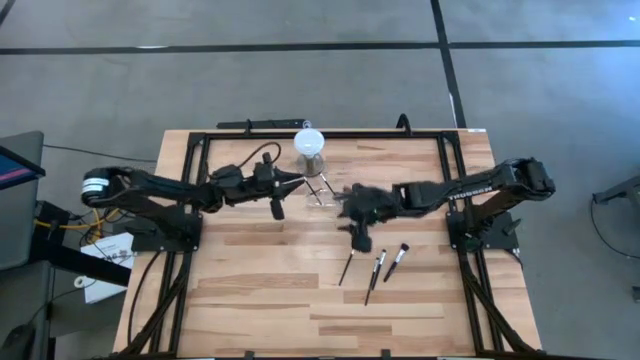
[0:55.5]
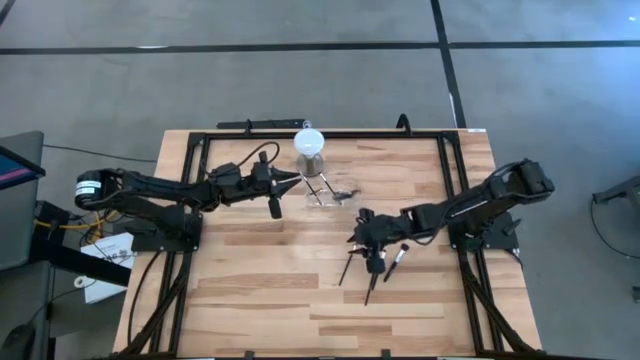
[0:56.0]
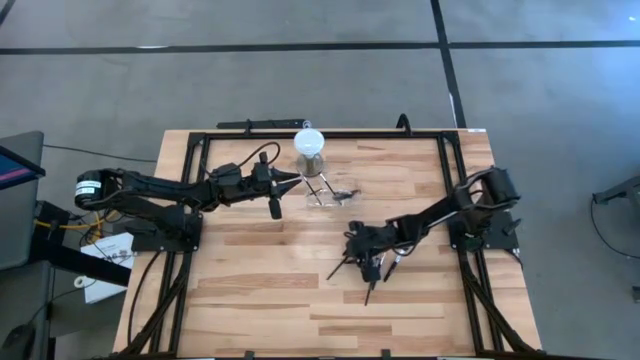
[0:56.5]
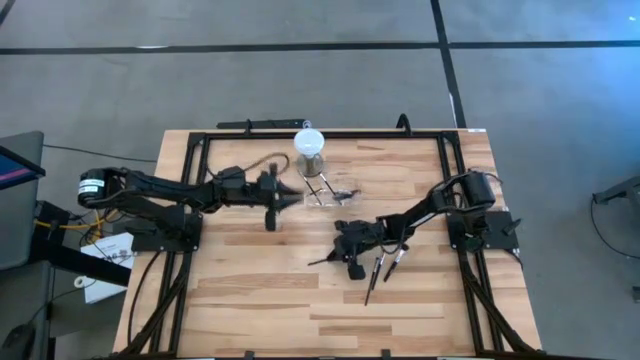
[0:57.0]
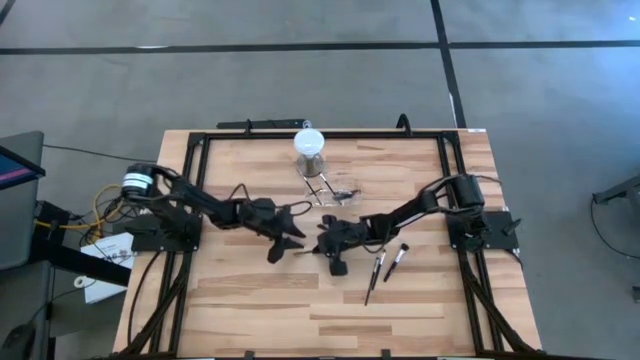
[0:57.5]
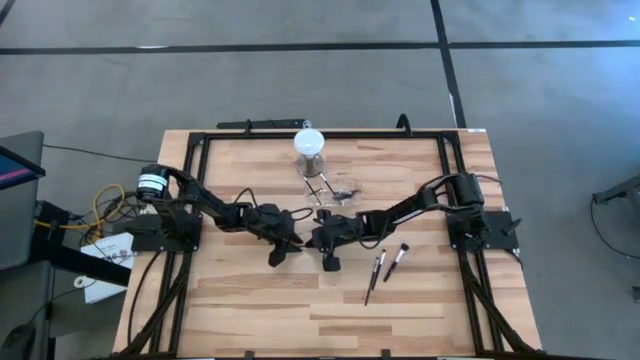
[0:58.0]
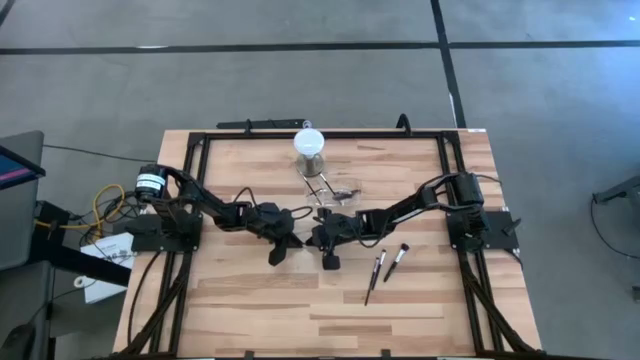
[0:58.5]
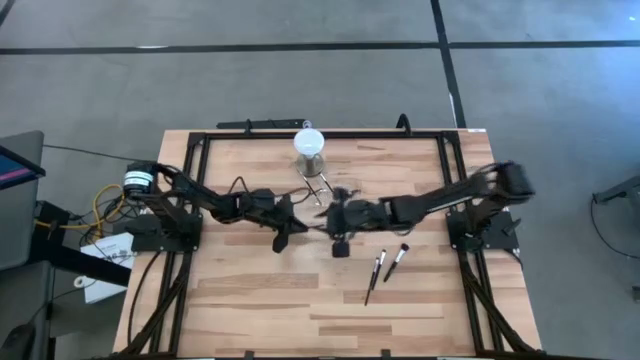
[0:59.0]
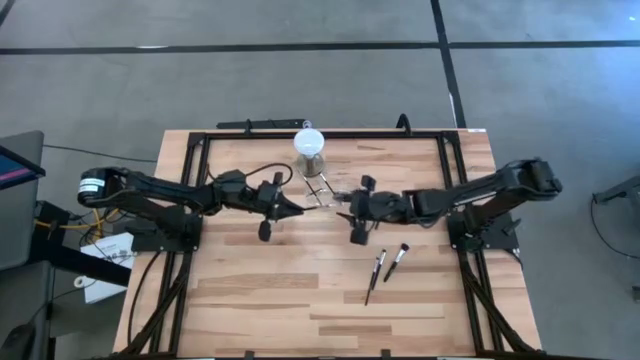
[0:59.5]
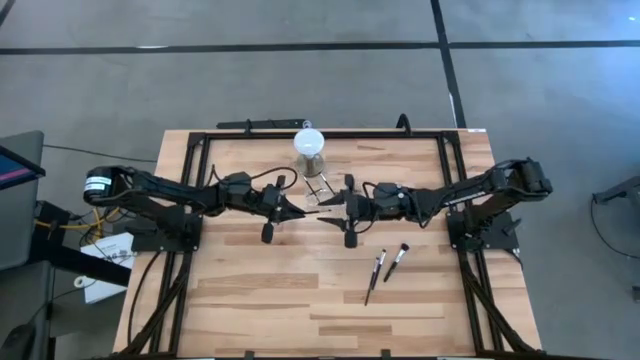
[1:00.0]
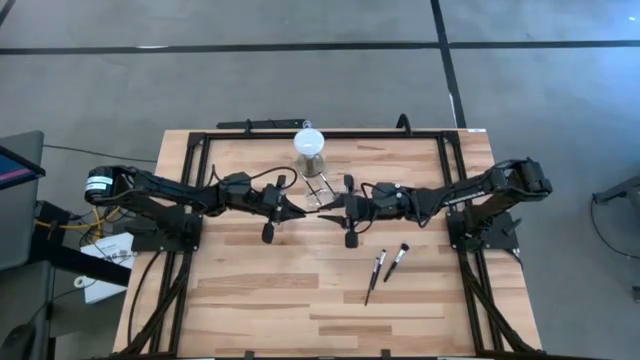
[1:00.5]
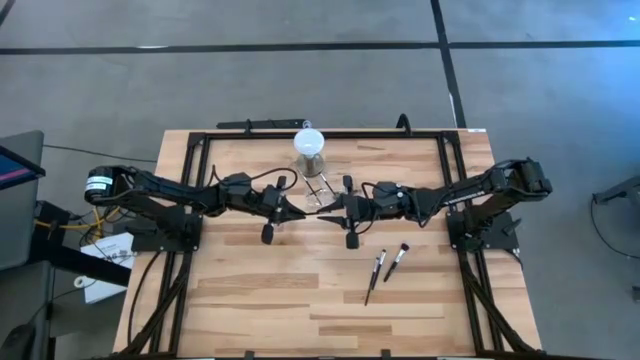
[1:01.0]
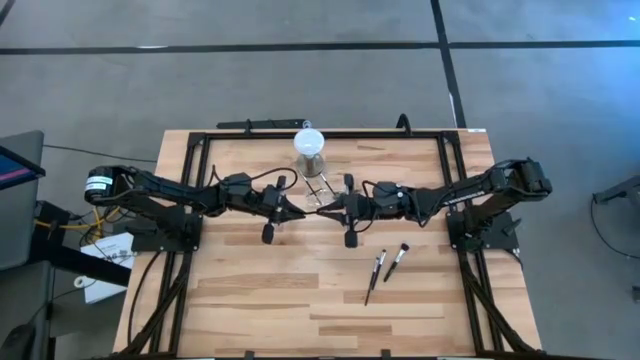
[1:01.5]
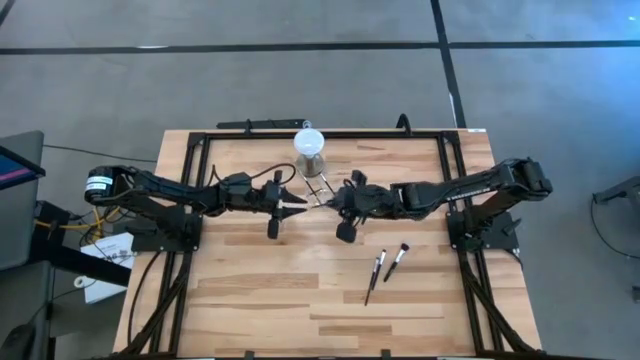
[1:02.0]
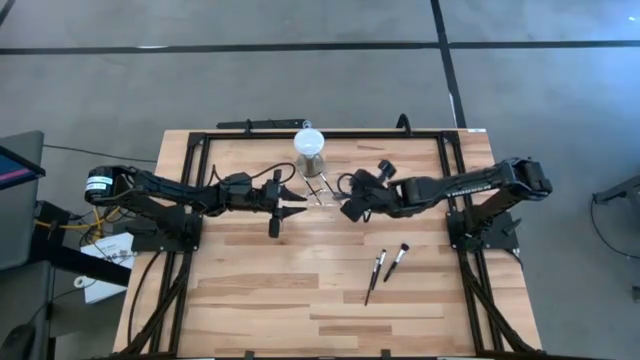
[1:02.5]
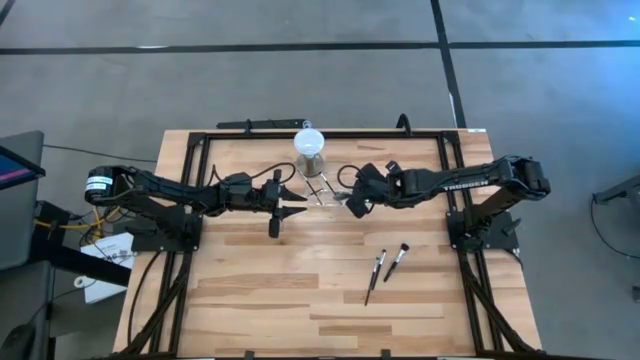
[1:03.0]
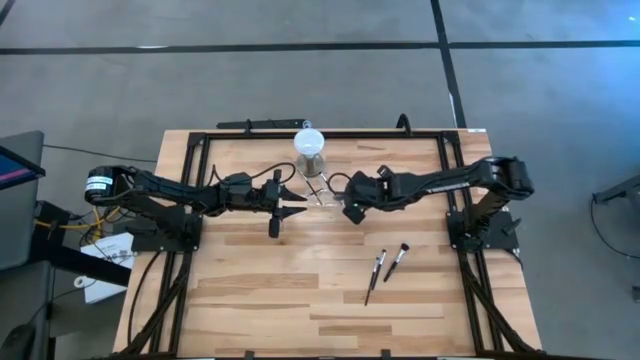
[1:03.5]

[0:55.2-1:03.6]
Task: Put items in baskets/containers
Put the black eyeshadow brush into the transparent organizer

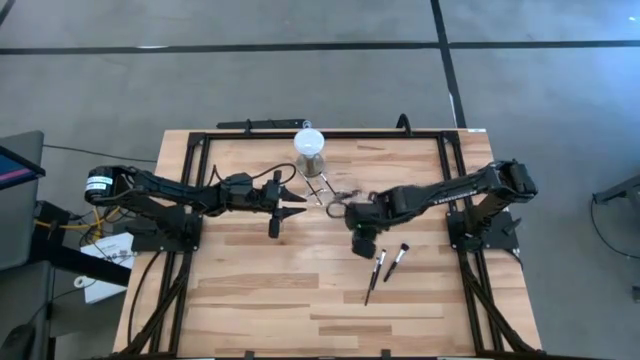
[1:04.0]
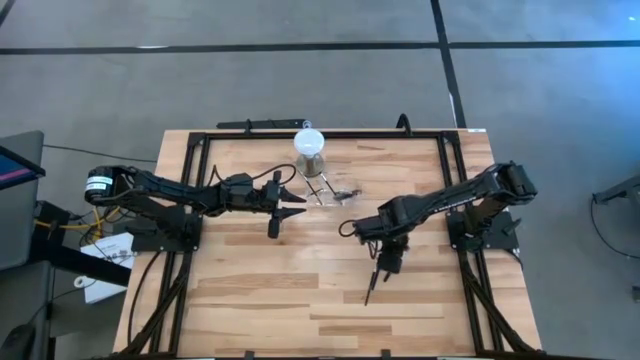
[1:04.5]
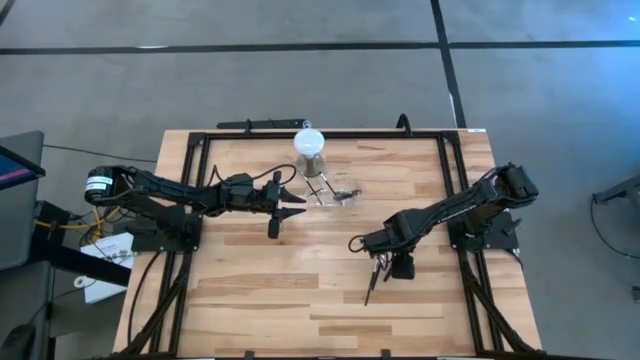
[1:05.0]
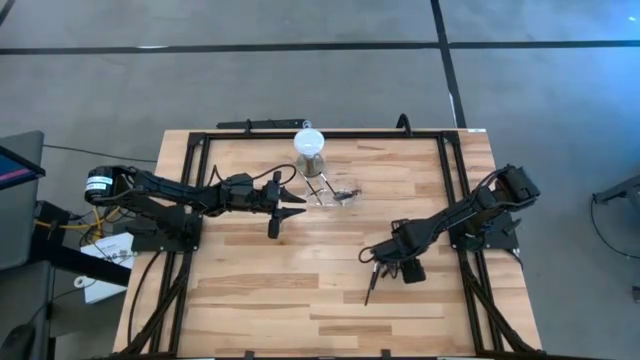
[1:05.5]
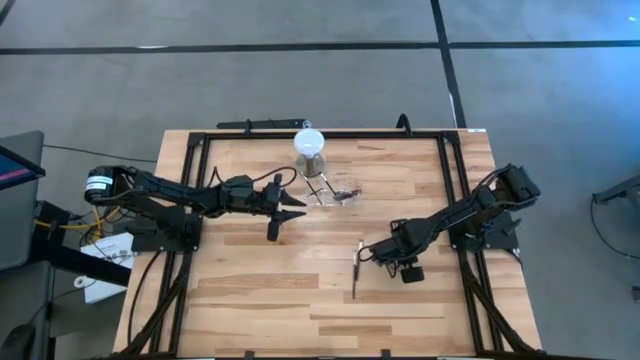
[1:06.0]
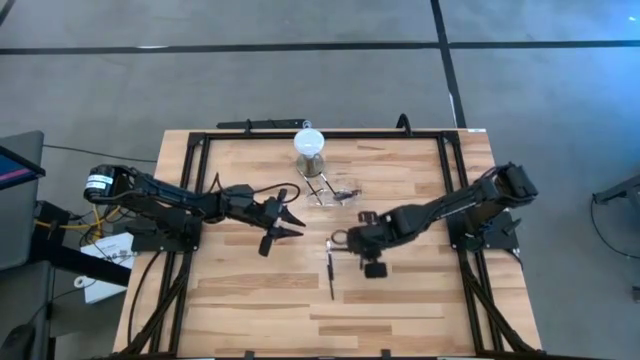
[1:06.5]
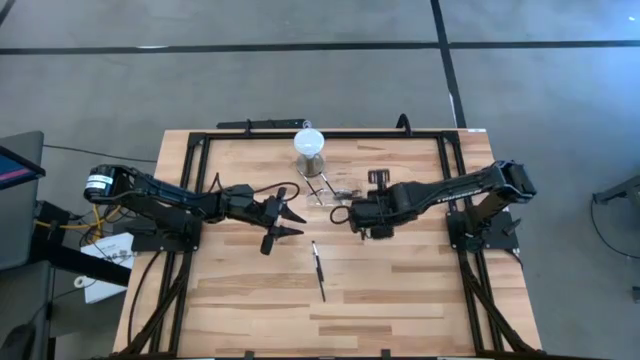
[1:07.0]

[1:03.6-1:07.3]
Put the black powder brush into the transparent organizer

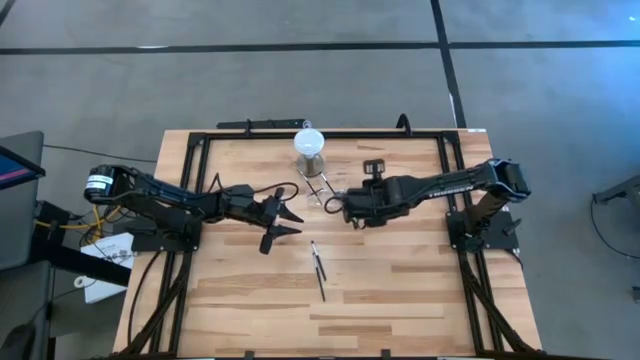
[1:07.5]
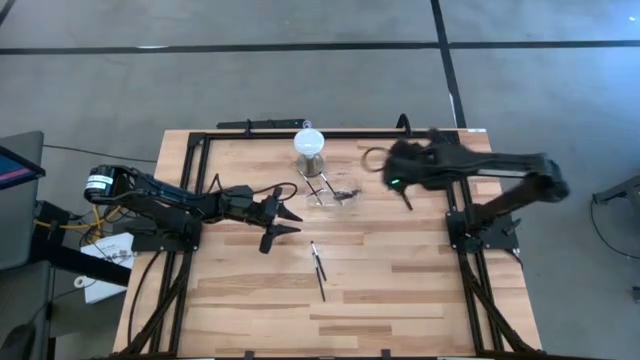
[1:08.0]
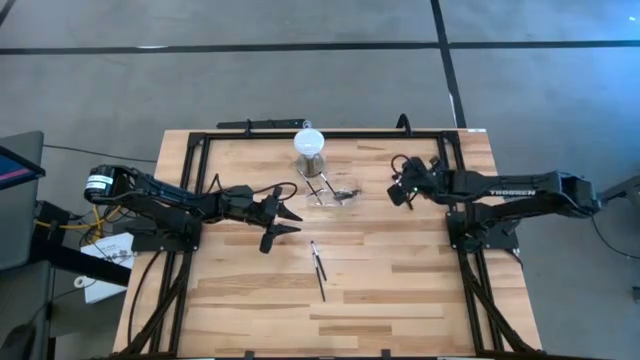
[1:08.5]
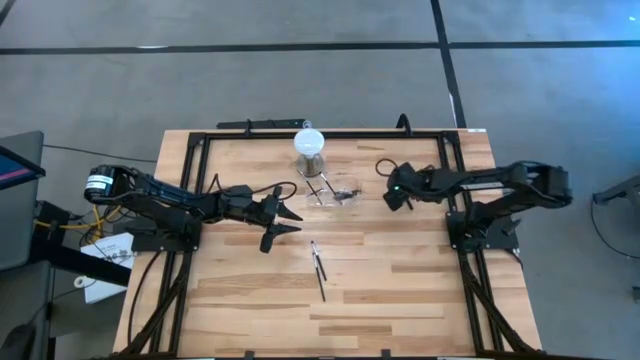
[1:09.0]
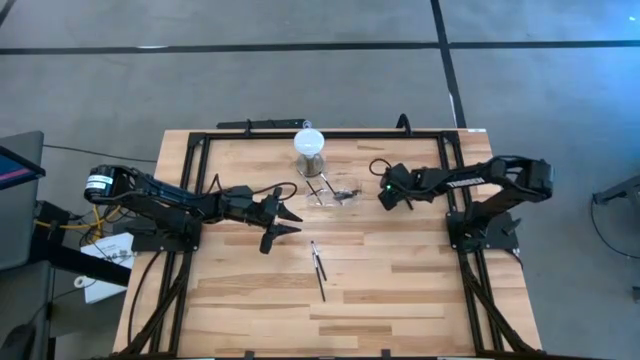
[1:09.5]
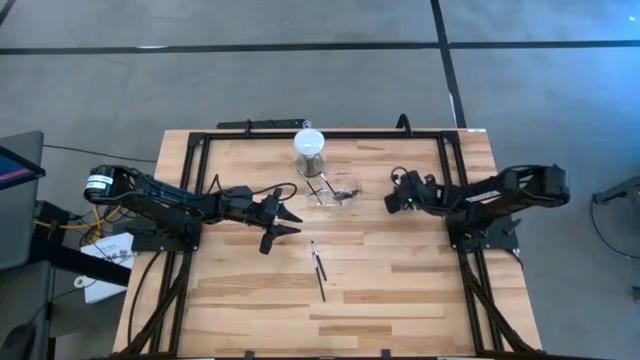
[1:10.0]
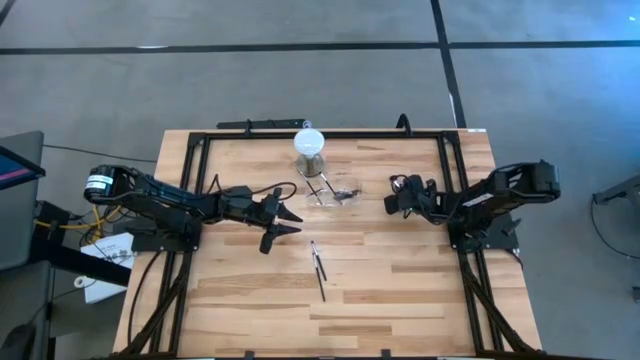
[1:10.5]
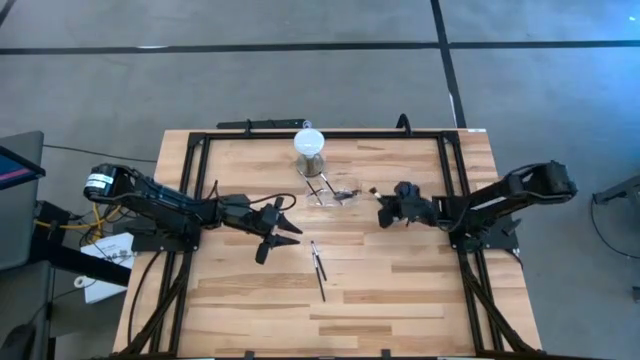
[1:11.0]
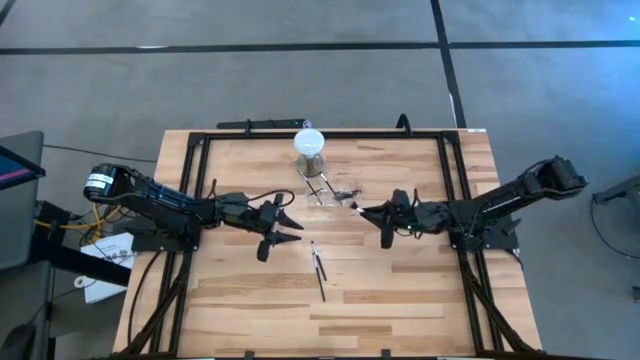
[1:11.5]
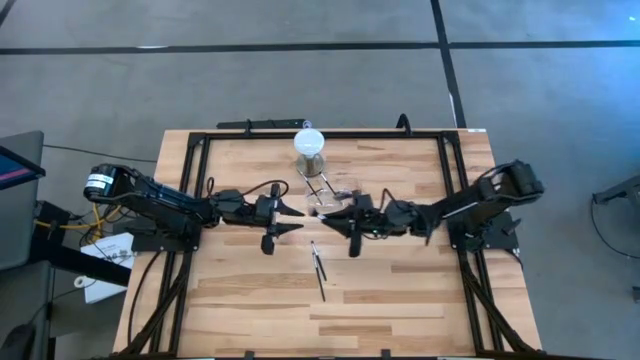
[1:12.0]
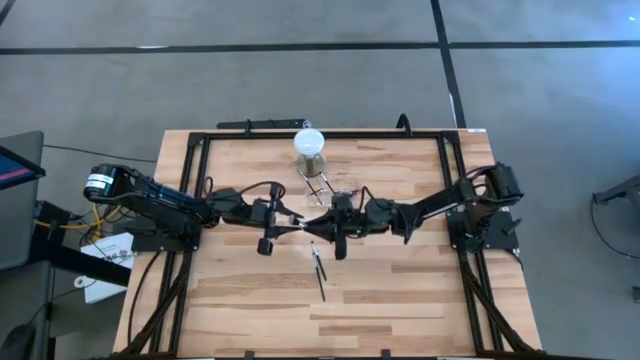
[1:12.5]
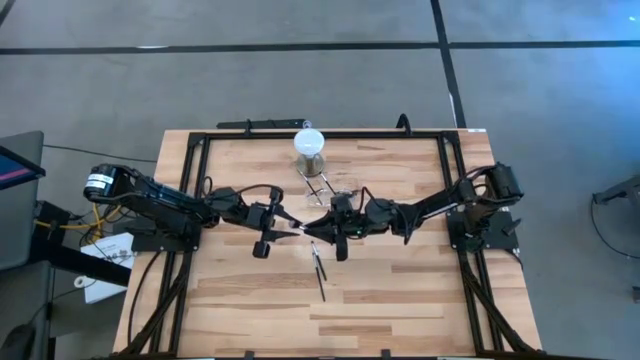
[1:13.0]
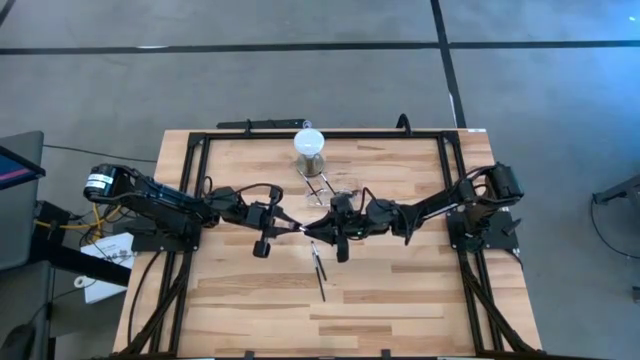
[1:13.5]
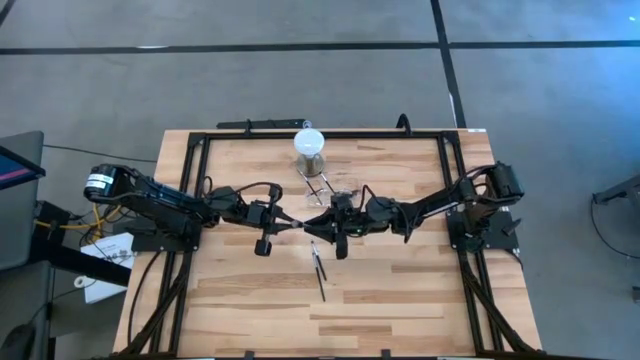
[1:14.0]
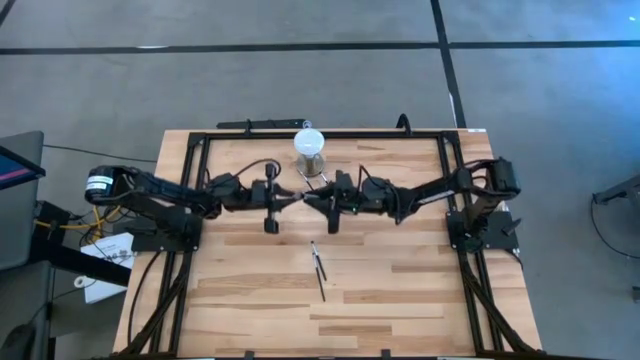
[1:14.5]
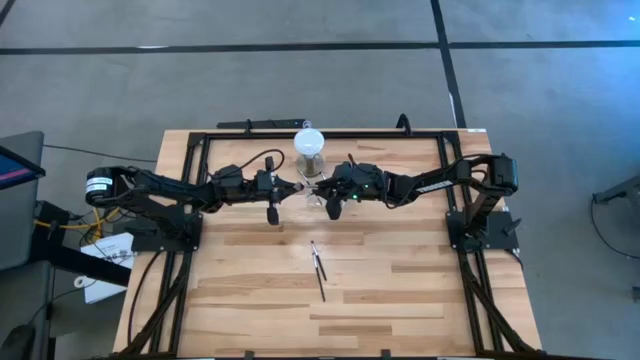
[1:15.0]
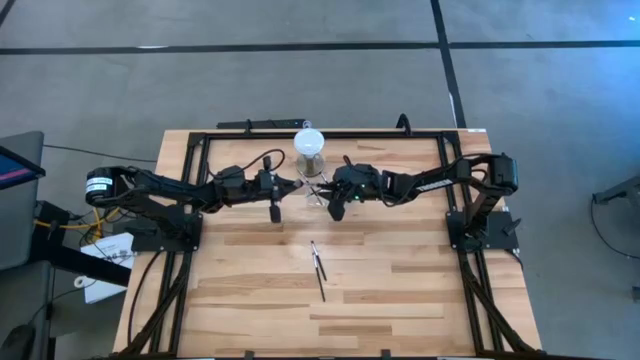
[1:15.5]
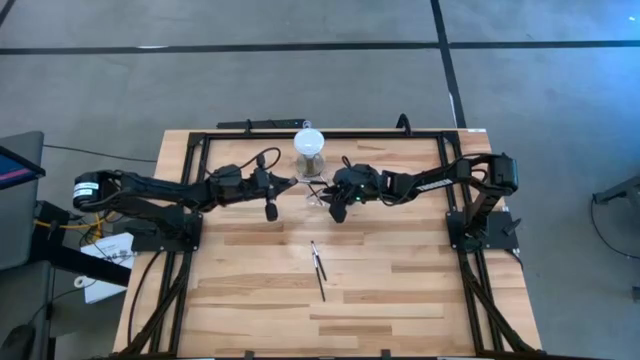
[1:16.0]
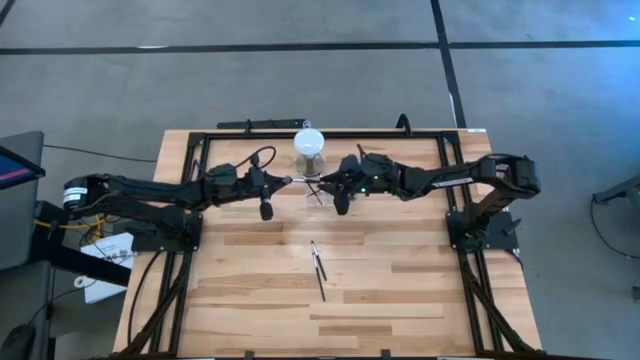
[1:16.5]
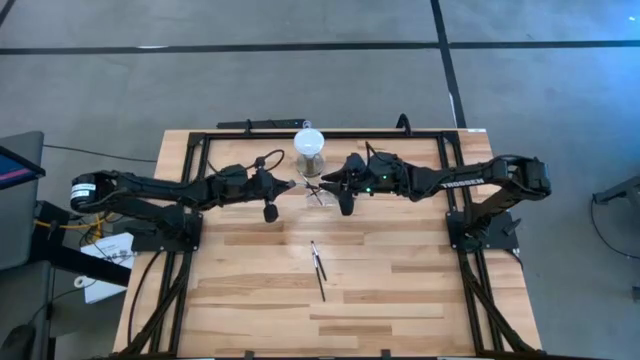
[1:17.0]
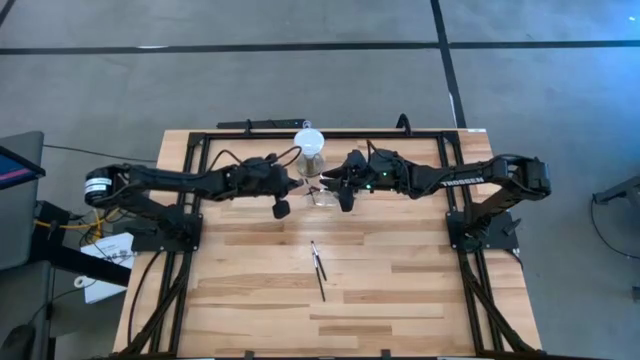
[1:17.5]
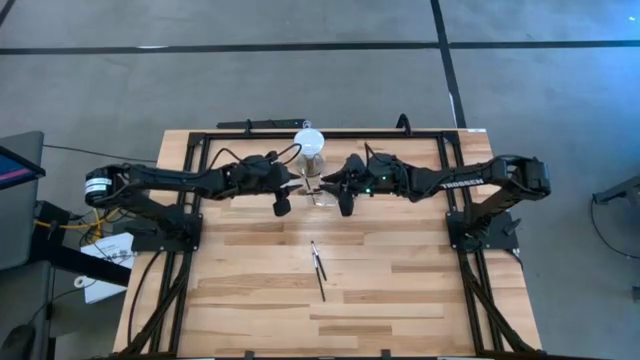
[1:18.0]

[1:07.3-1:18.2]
Put the black powder brush into the transparent organizer
